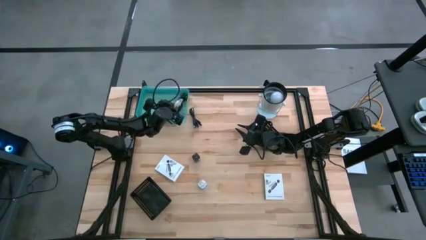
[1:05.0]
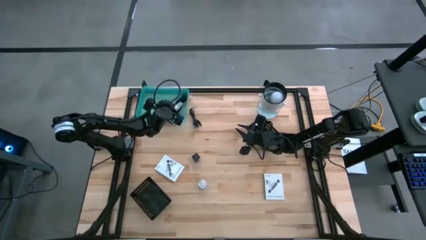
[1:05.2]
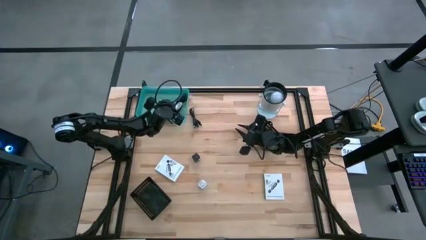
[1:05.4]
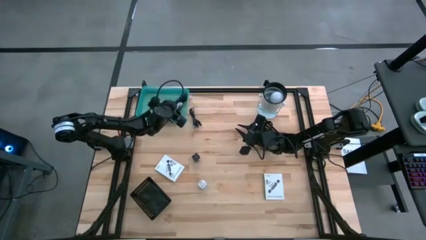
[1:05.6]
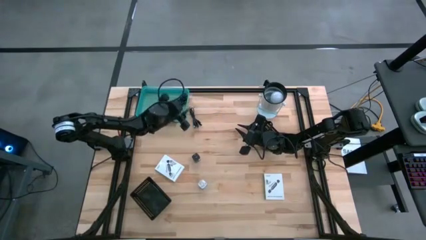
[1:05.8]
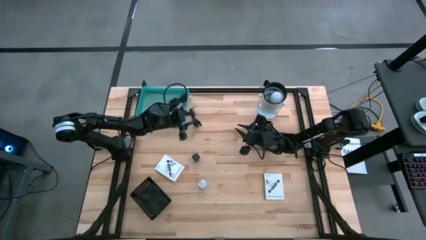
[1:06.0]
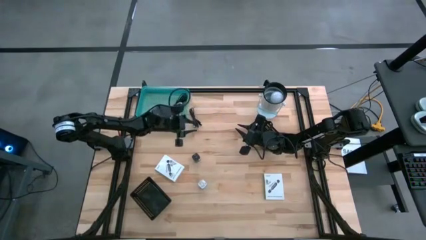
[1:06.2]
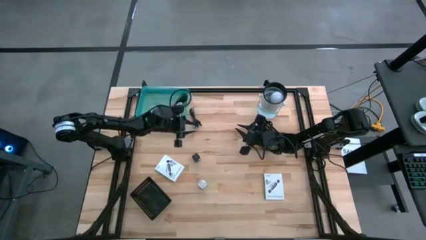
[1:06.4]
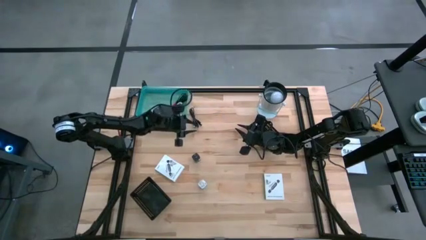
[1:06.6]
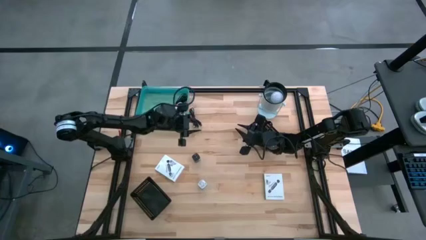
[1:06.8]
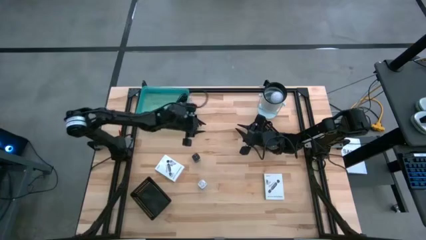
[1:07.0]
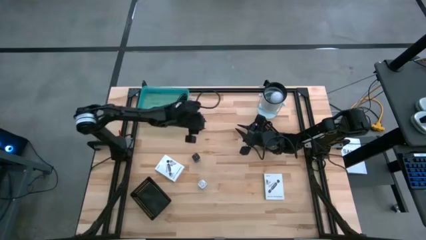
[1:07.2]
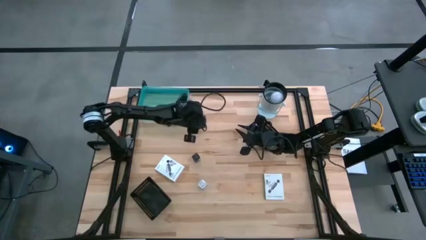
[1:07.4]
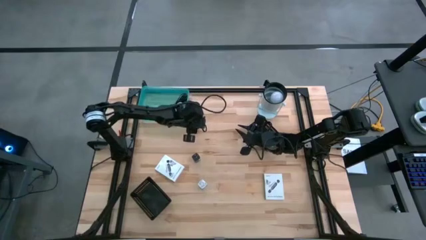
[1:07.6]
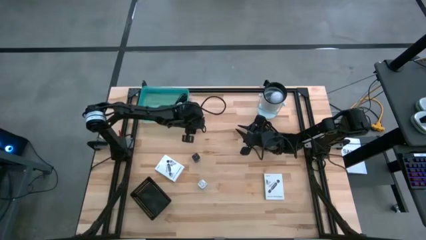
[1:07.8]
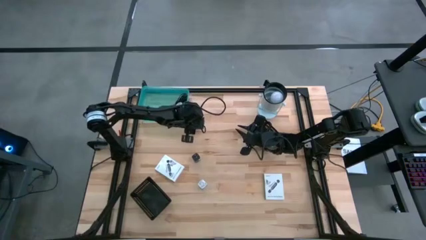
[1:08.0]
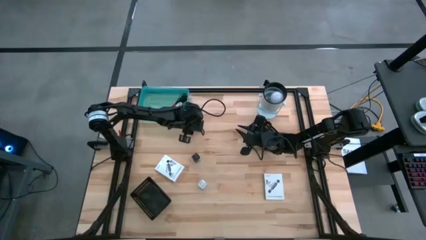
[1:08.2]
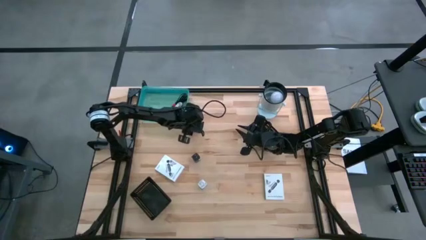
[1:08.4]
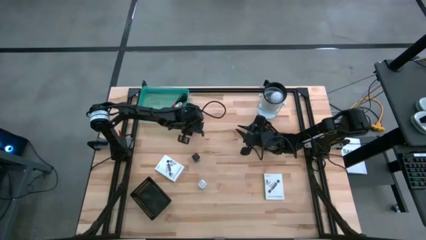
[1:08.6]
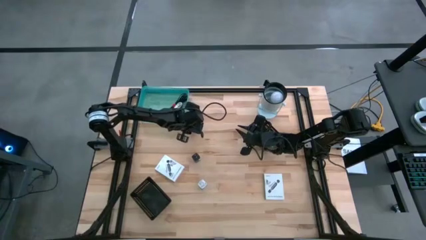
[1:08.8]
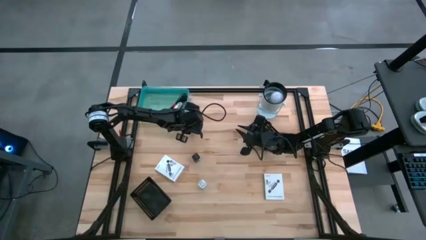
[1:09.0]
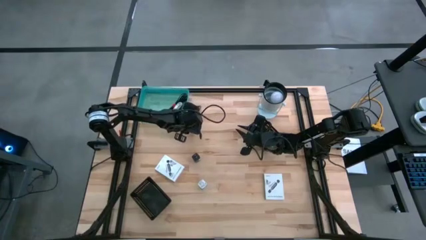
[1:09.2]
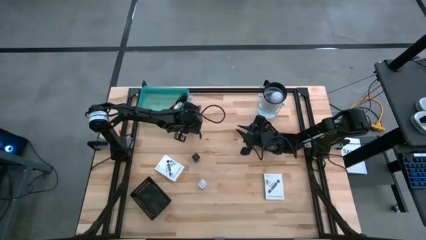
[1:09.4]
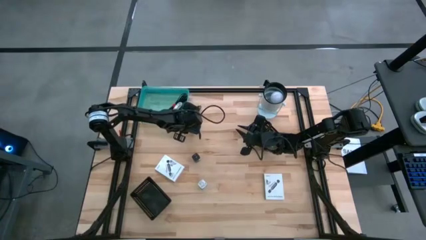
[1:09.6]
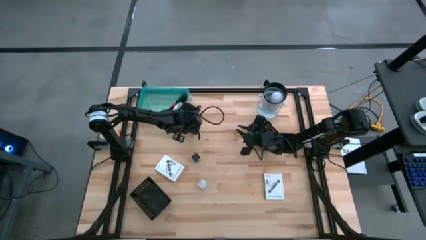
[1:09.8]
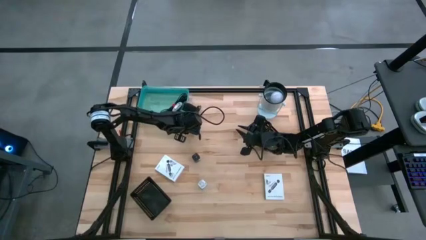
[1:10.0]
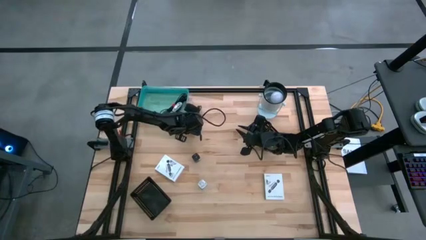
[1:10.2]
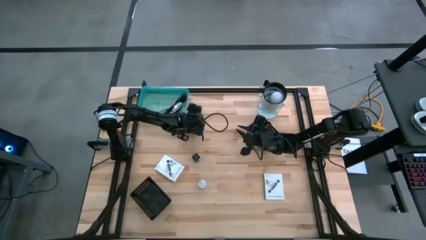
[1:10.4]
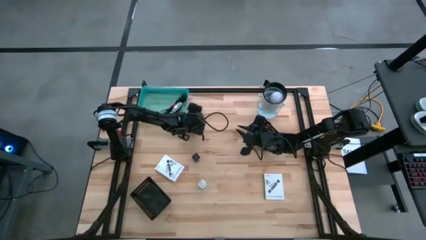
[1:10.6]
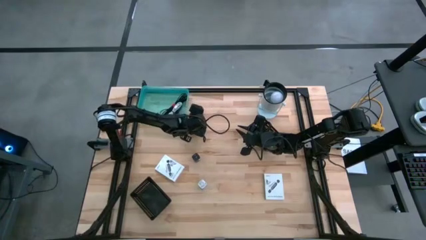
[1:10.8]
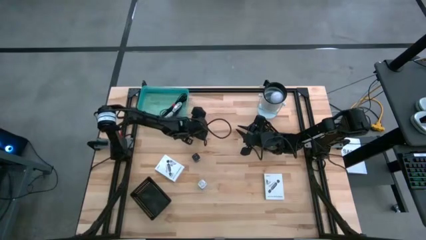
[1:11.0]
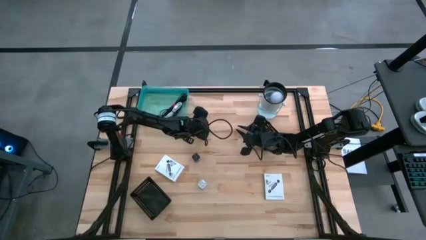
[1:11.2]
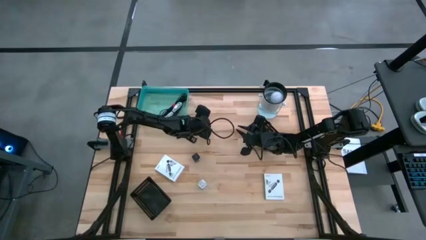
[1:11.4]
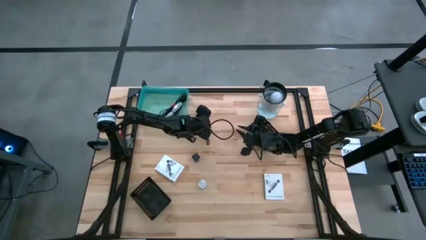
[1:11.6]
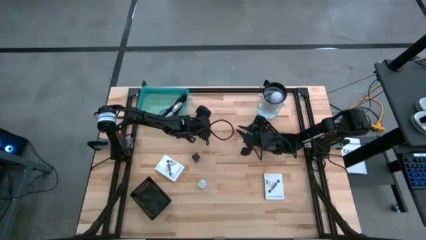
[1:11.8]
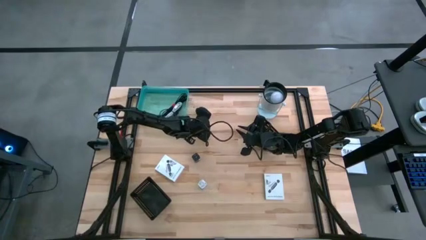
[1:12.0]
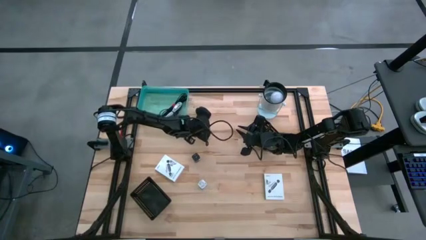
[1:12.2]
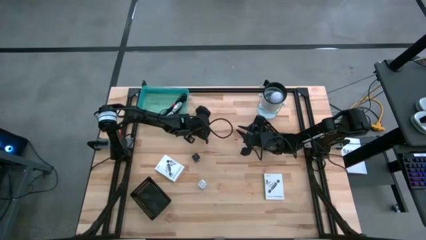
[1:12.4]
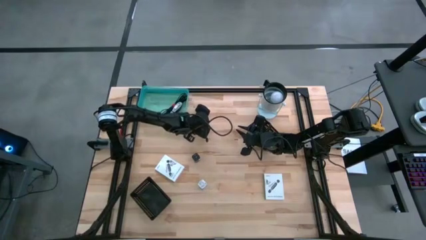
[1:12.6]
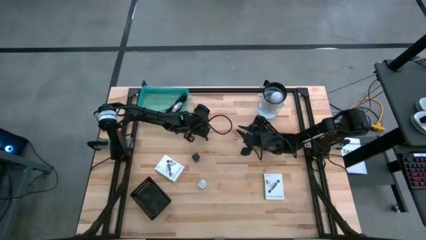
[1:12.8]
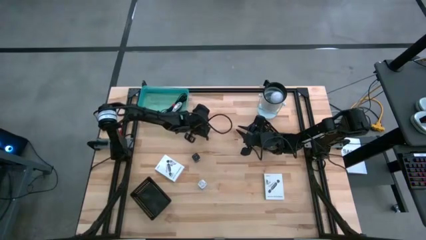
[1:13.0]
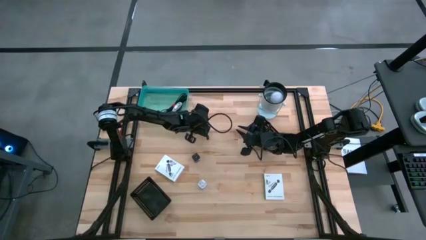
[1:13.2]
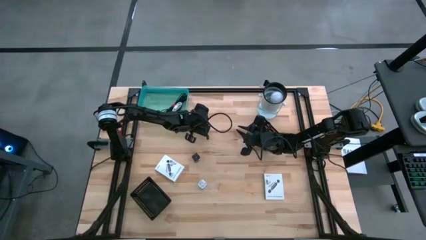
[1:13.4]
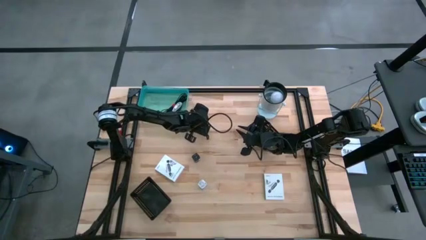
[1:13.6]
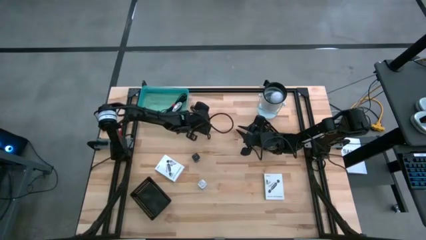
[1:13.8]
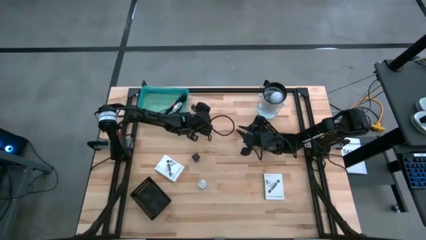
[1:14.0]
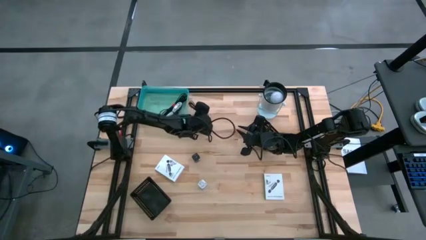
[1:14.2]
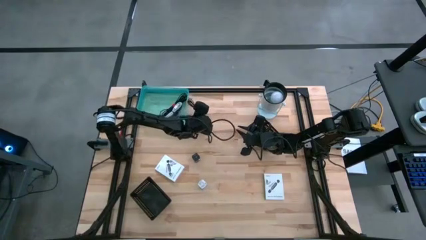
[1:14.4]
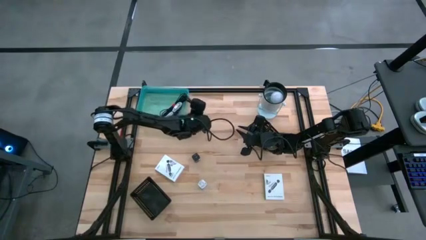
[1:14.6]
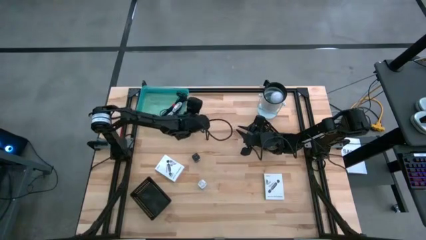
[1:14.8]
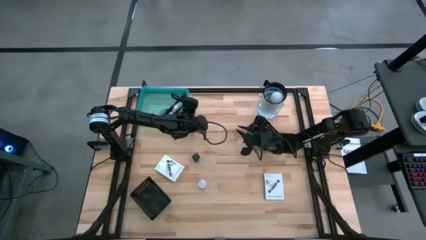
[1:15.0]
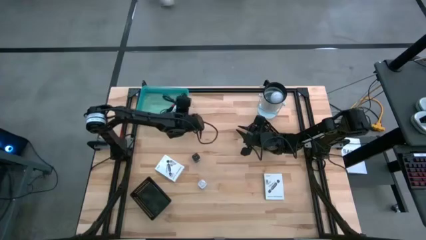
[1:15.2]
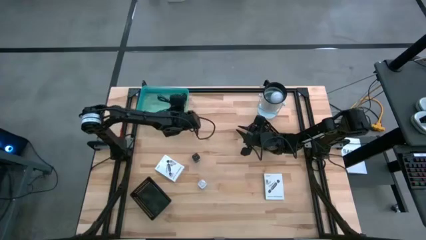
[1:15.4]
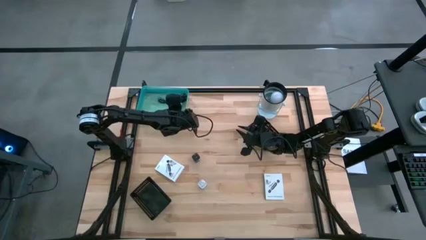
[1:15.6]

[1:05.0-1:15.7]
Task: Pick and place items into bin
Put the black charger cable into the green bin
